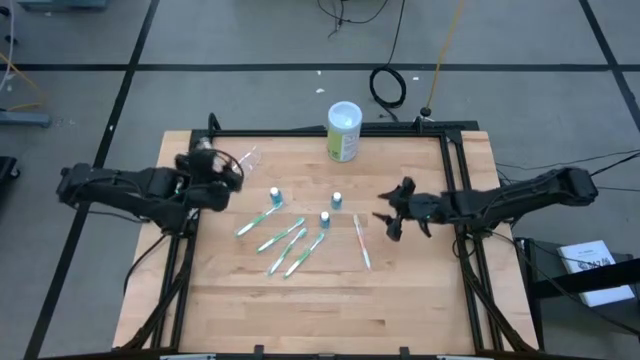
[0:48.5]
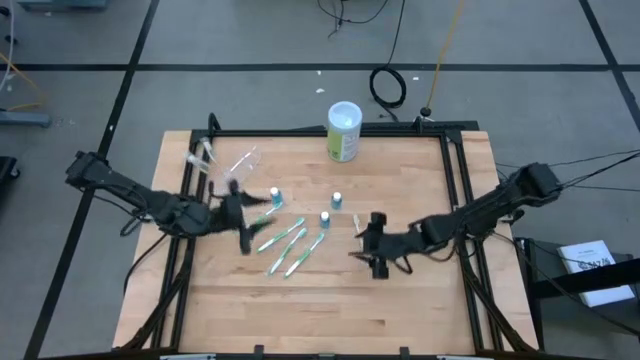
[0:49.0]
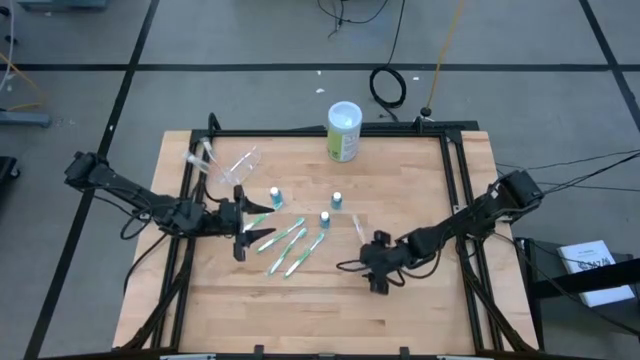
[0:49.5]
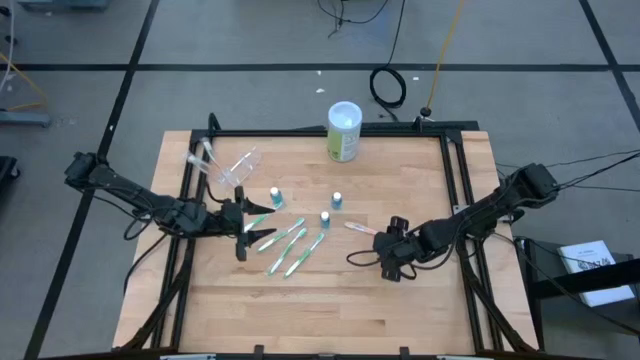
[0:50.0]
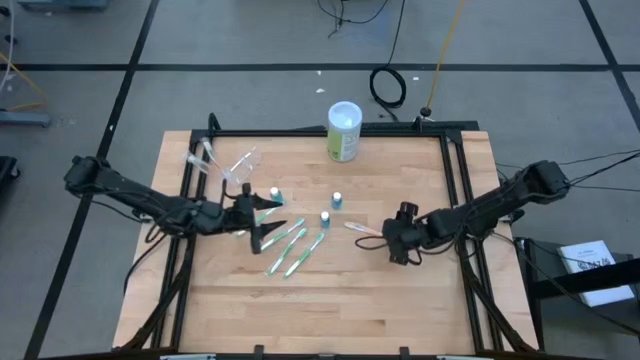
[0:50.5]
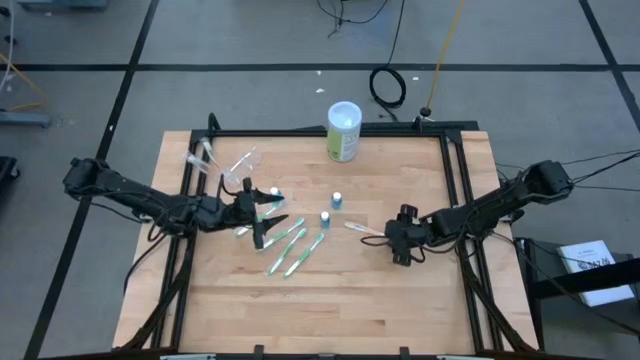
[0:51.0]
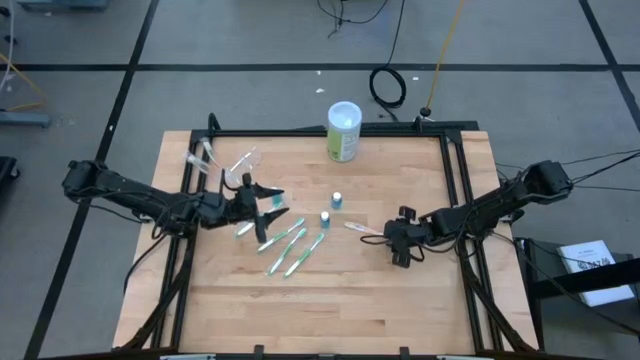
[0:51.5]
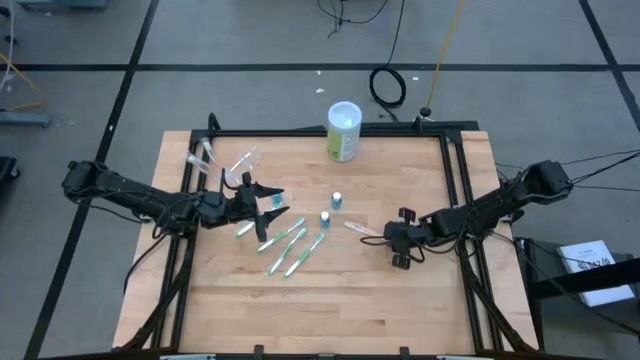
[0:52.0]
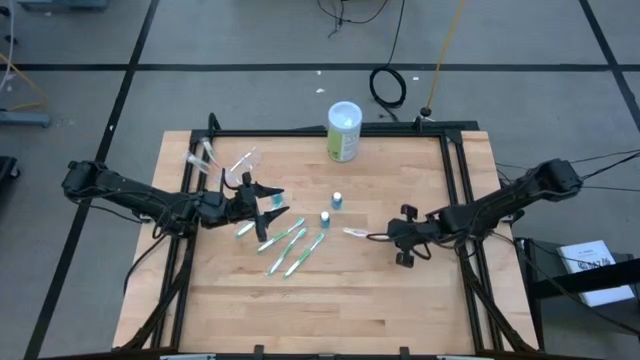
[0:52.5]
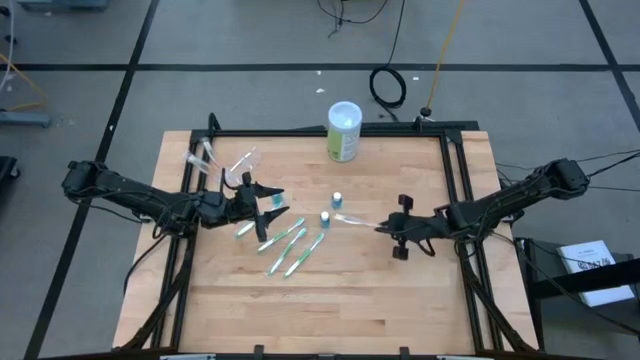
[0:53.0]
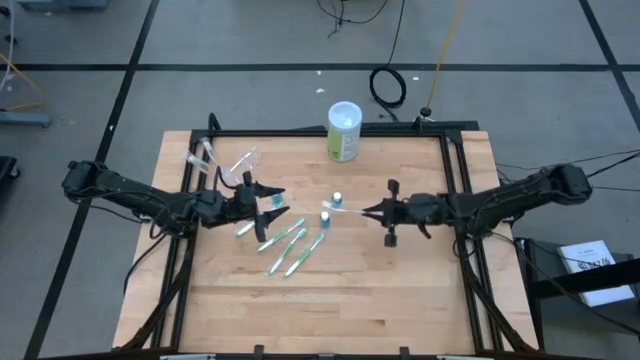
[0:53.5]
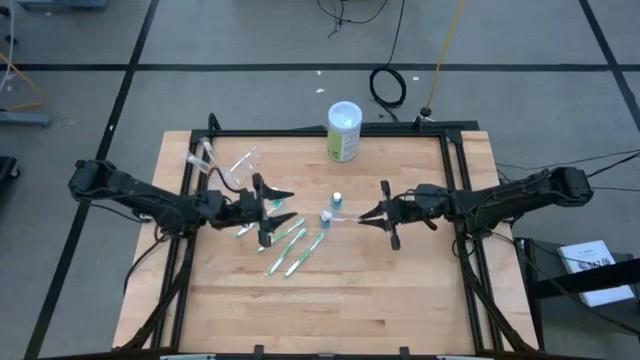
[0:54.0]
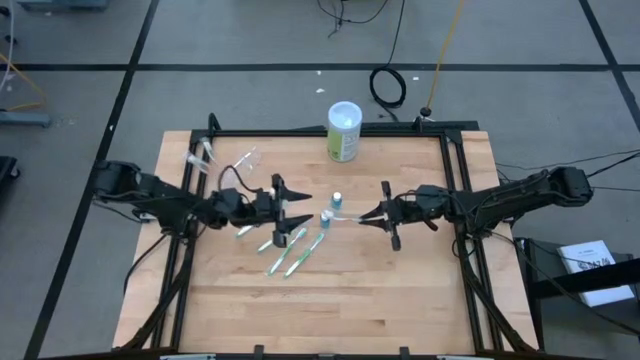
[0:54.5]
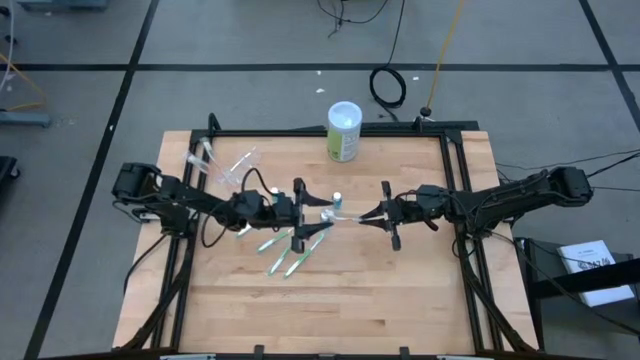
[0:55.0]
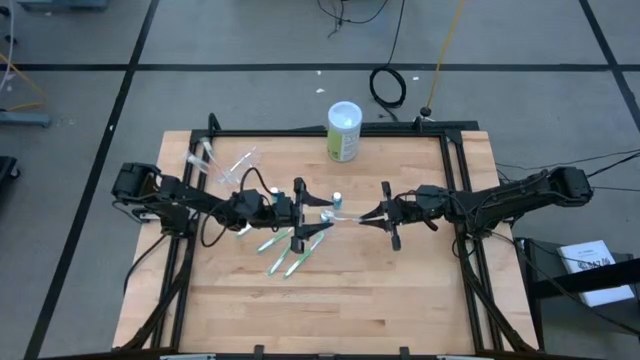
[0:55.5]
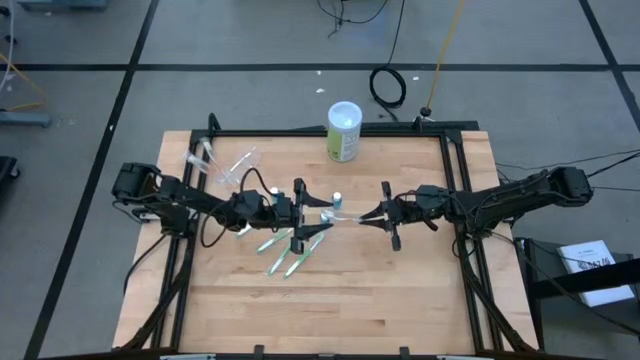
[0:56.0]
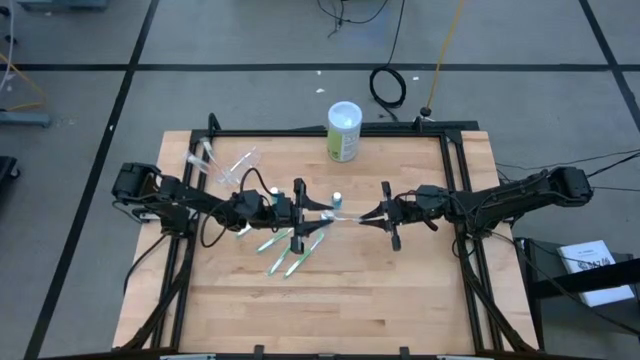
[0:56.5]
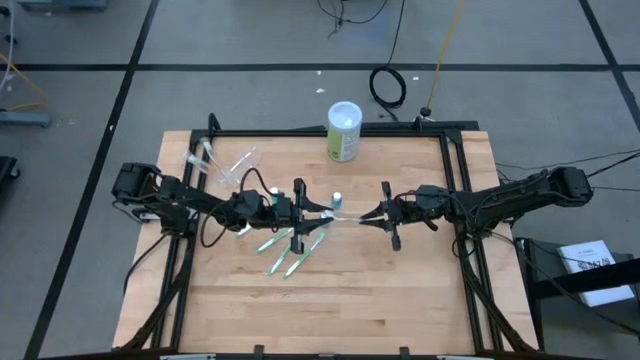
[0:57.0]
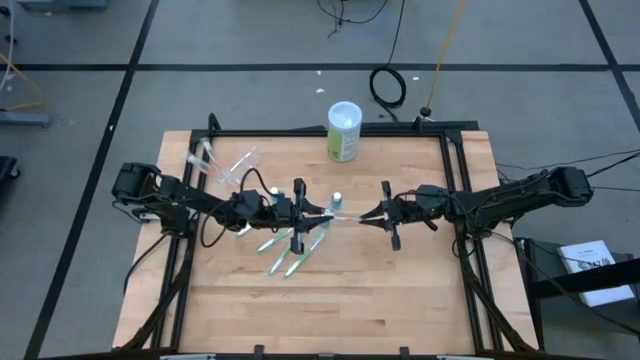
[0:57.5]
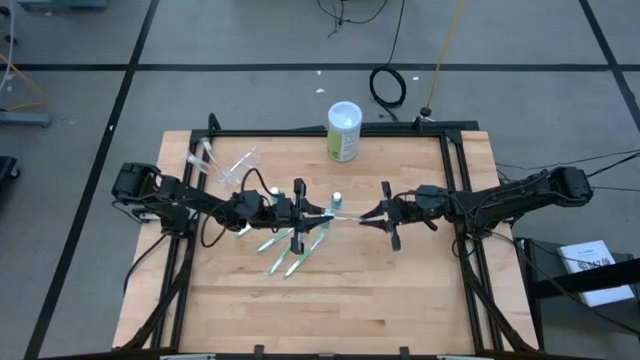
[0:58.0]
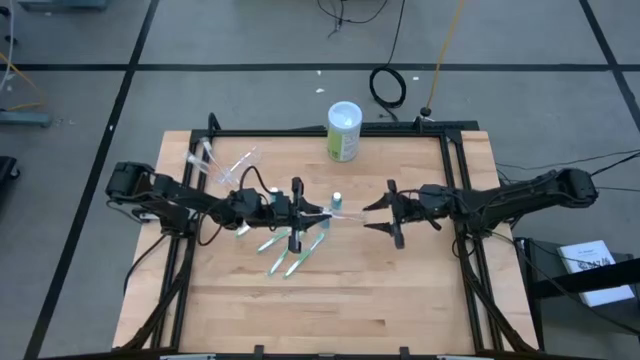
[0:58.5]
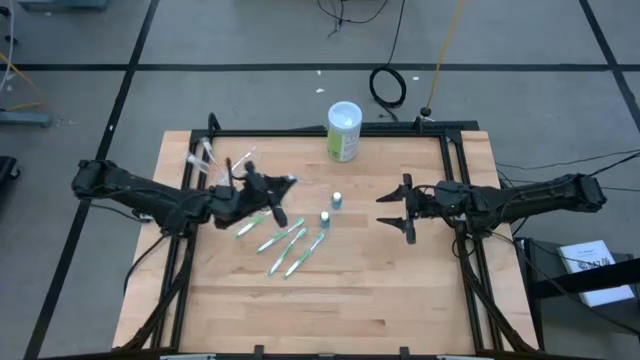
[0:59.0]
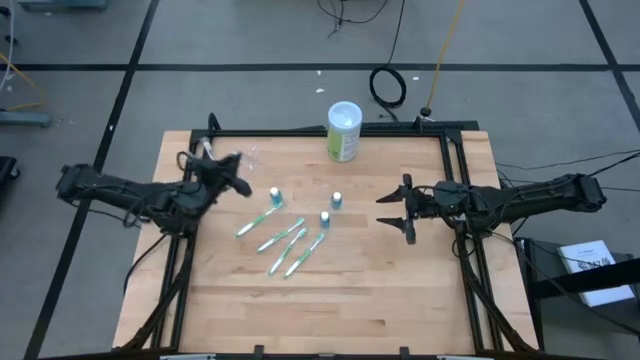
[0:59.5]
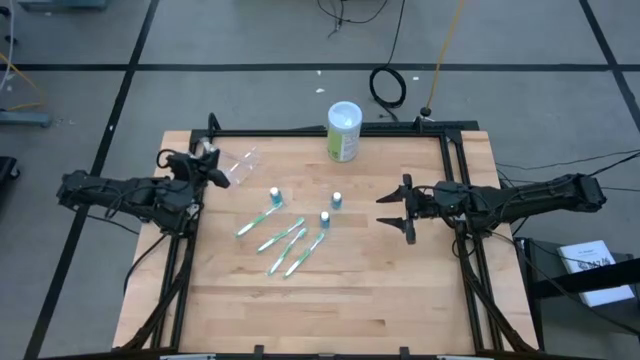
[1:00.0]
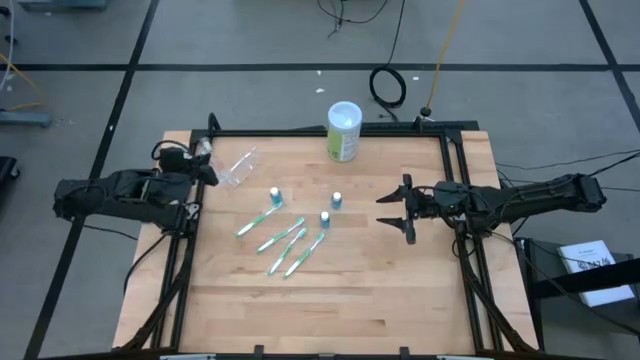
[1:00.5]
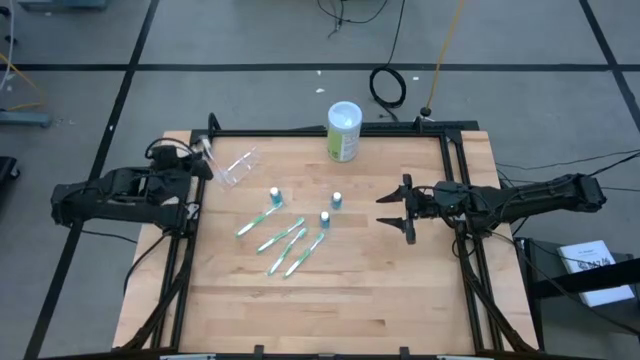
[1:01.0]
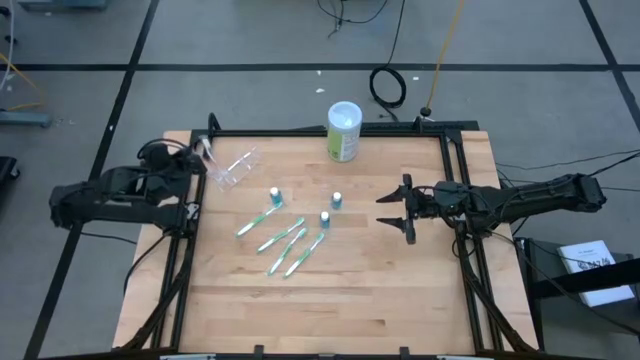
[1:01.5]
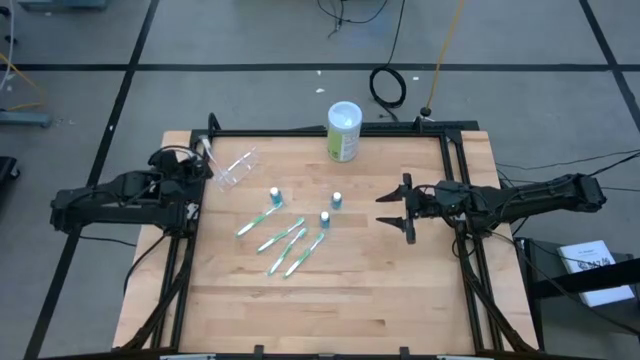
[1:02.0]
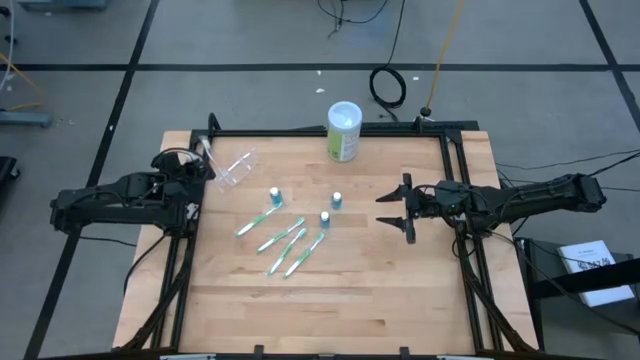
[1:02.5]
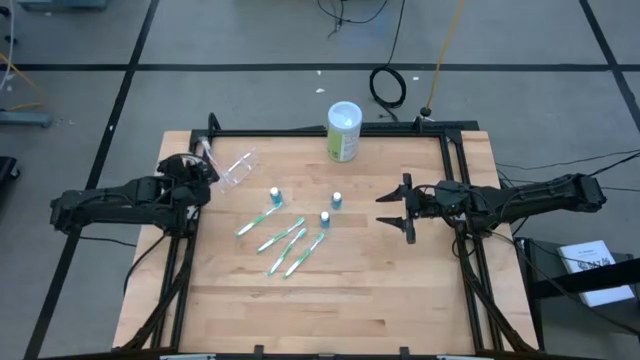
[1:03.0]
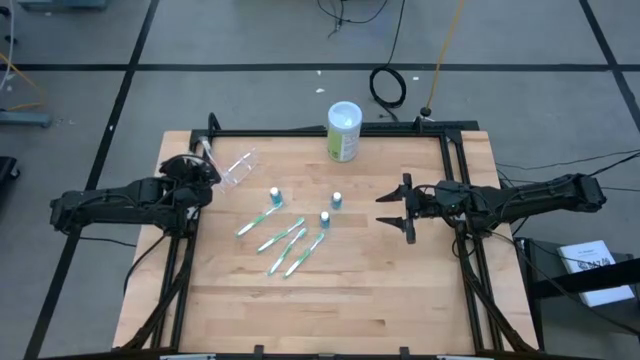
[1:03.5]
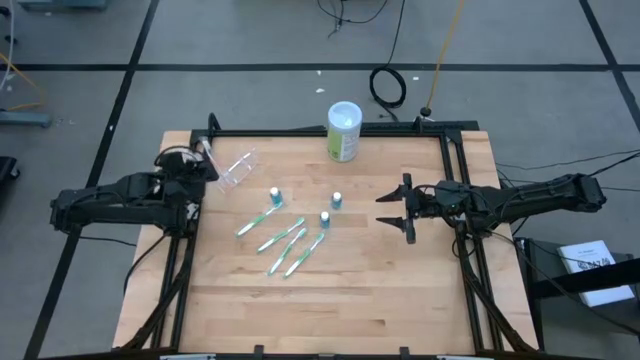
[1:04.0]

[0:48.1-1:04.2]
Task: Pick & Place toothbrushing station
Put the orange toothbrush into the left section of the transparent organizer

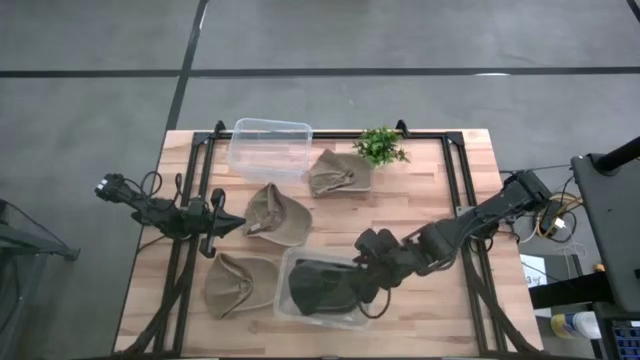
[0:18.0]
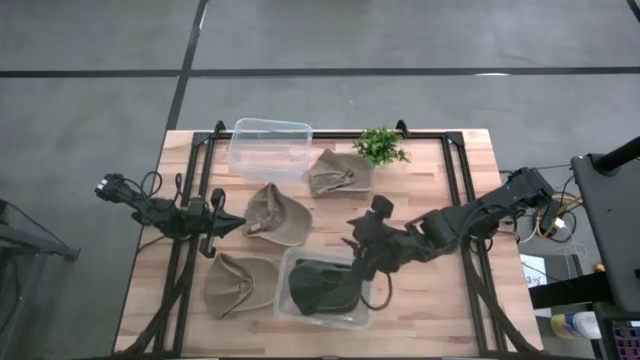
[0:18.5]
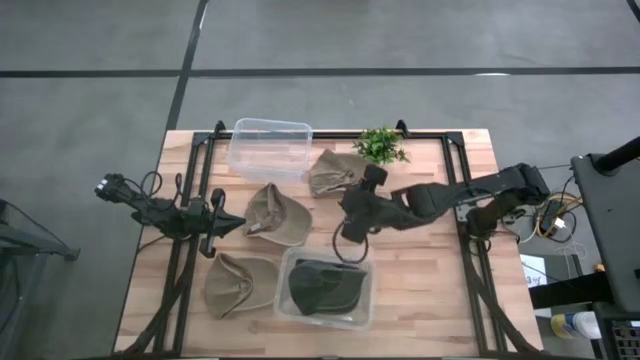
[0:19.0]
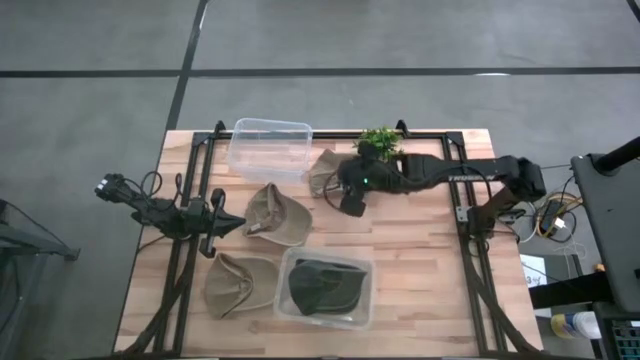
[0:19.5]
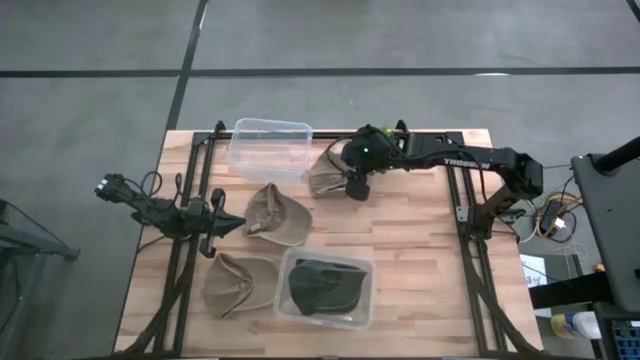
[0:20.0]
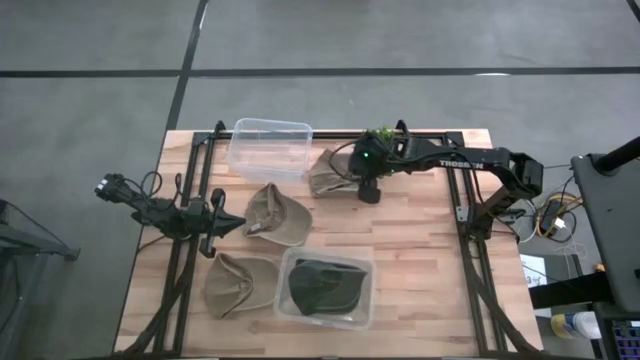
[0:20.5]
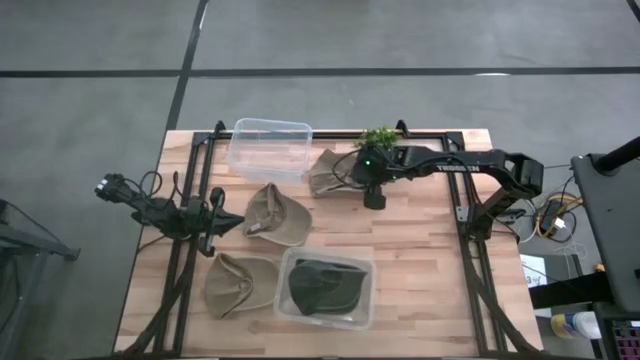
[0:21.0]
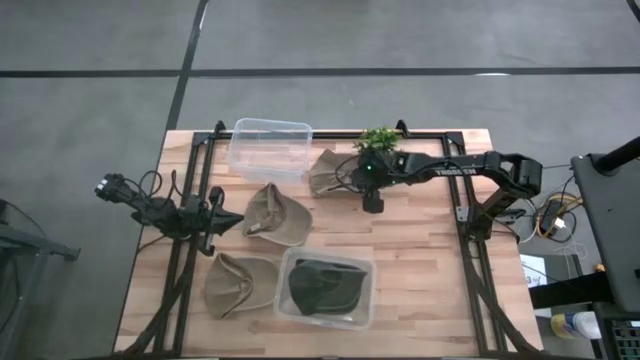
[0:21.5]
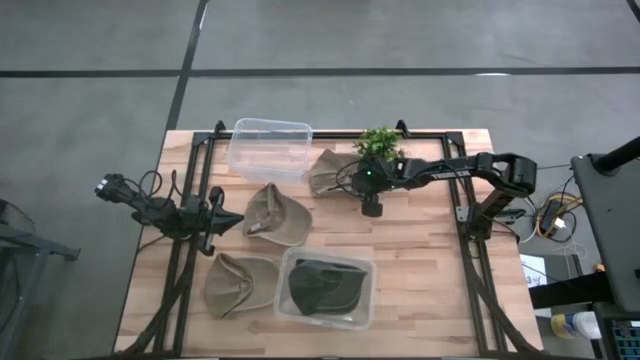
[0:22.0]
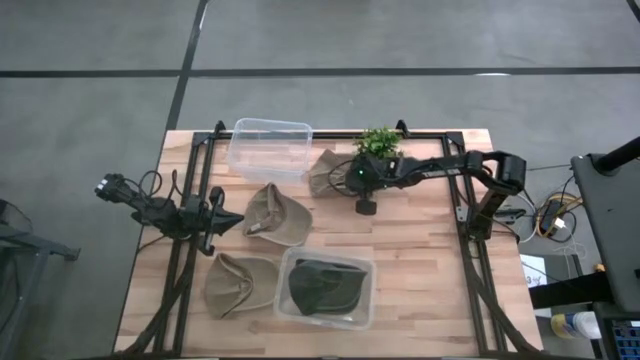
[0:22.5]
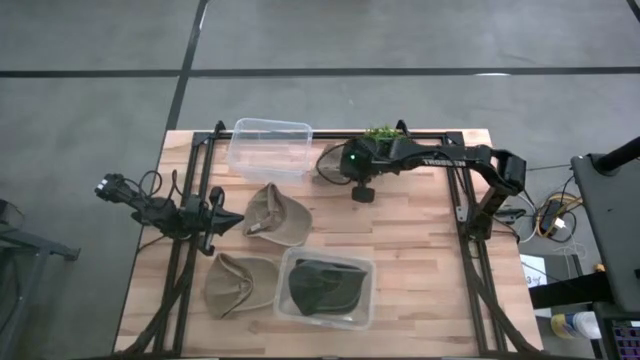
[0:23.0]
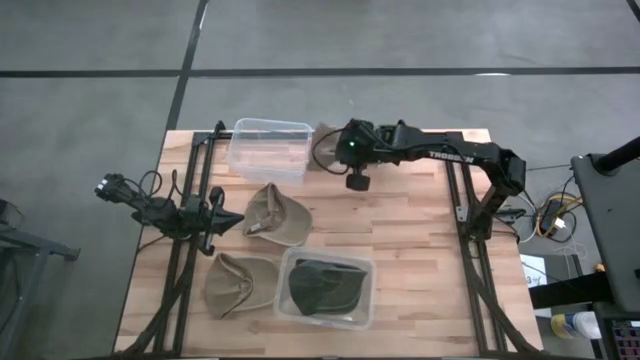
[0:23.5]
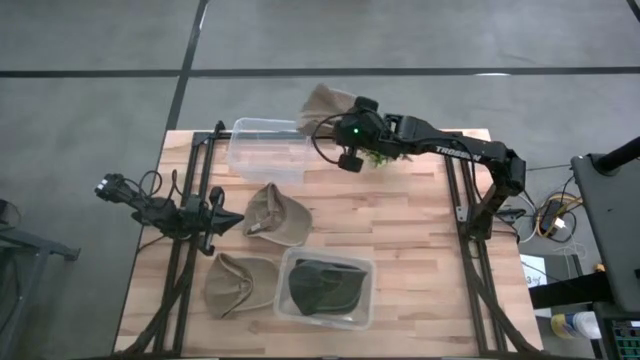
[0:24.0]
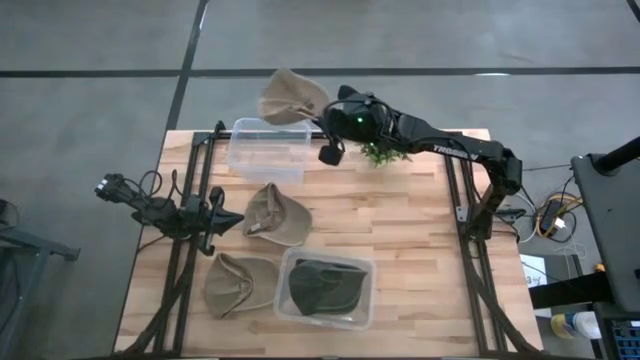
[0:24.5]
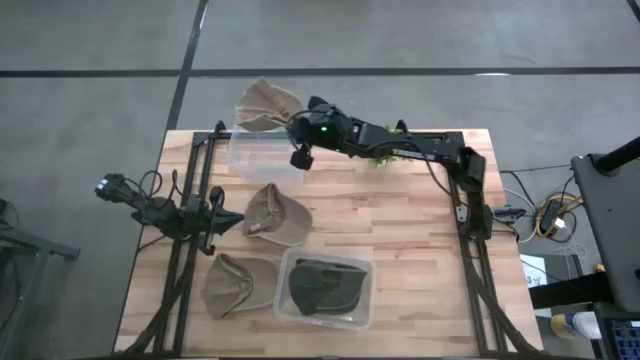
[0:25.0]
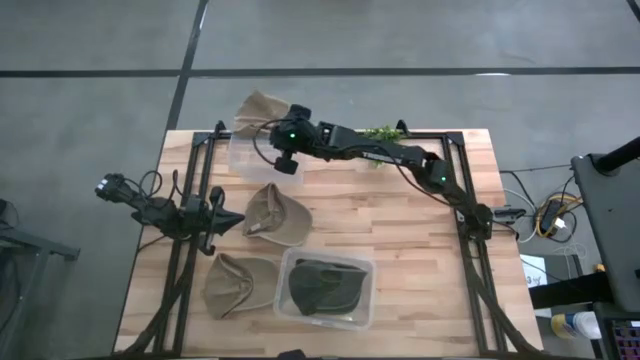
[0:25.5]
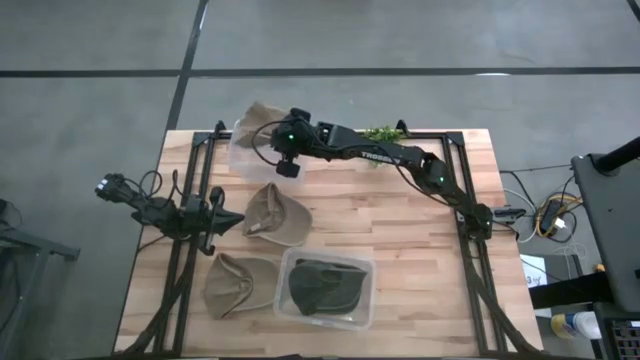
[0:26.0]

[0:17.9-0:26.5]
Task: Pick & Place hat
Put the top brown cap into the top transparent bin
